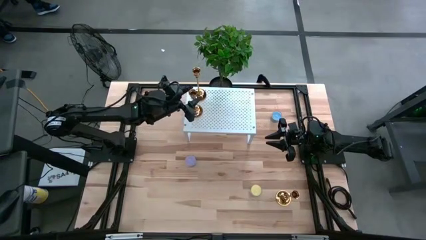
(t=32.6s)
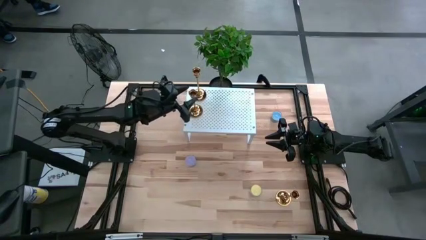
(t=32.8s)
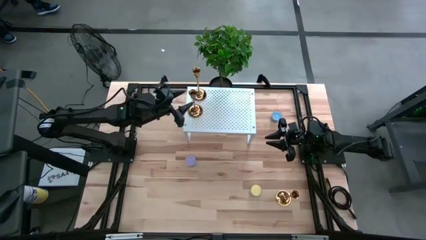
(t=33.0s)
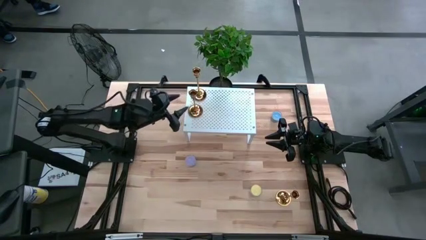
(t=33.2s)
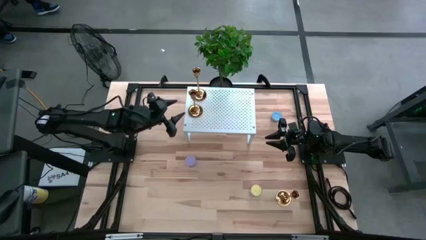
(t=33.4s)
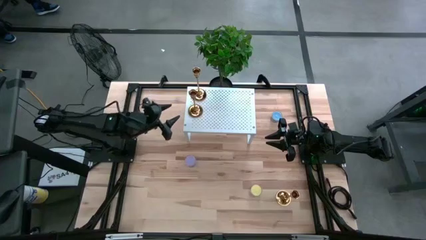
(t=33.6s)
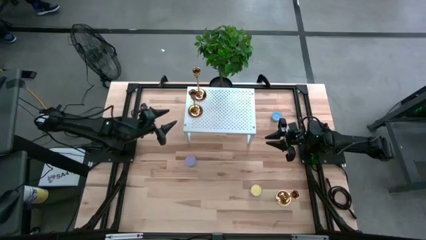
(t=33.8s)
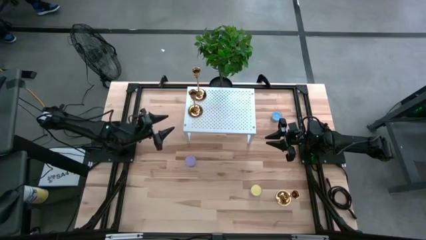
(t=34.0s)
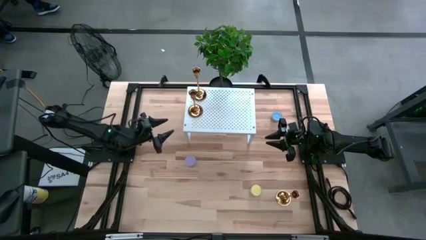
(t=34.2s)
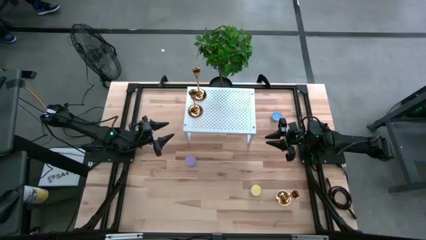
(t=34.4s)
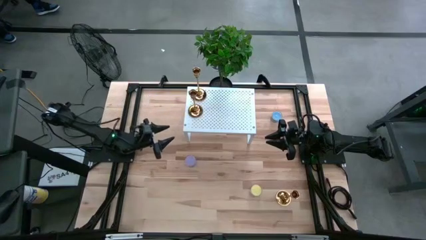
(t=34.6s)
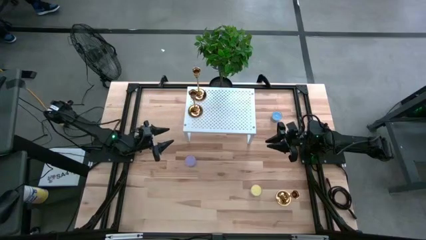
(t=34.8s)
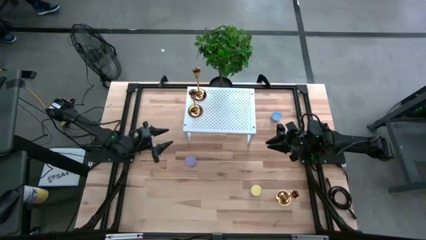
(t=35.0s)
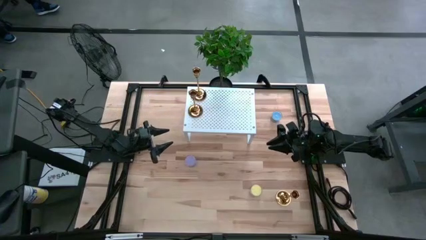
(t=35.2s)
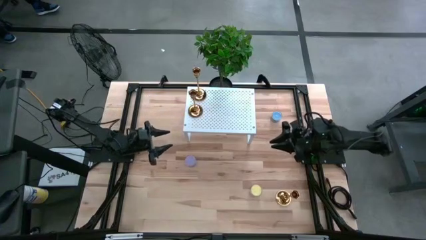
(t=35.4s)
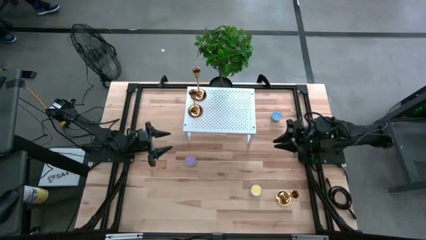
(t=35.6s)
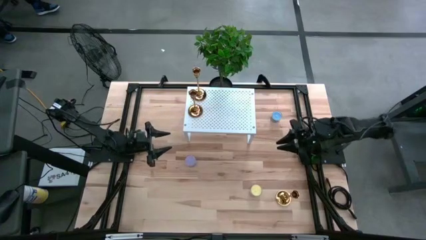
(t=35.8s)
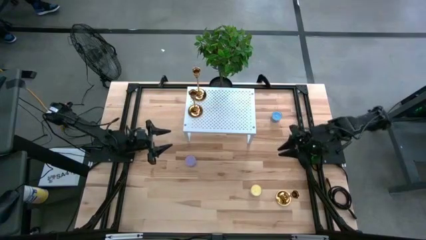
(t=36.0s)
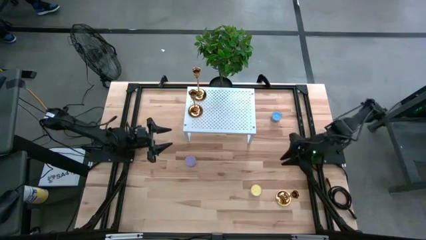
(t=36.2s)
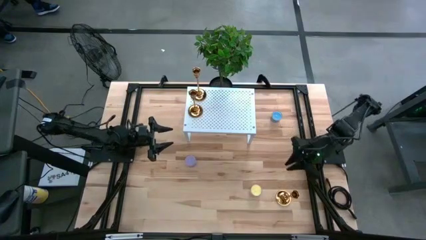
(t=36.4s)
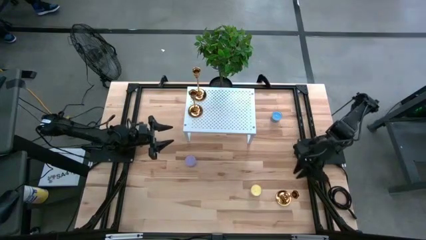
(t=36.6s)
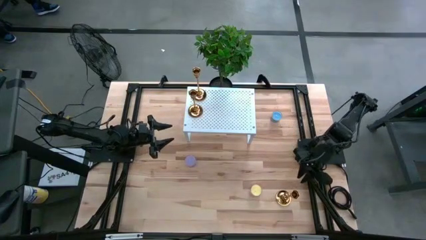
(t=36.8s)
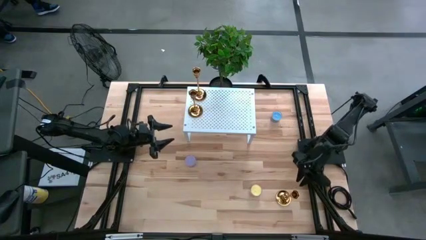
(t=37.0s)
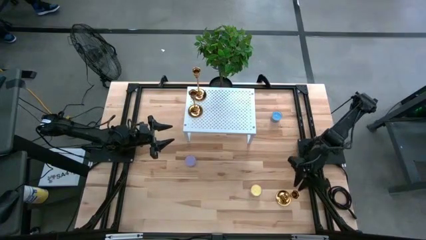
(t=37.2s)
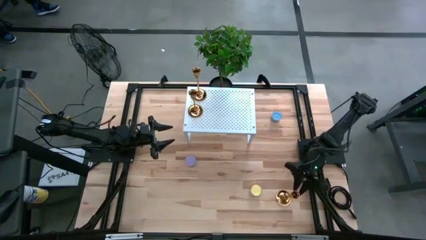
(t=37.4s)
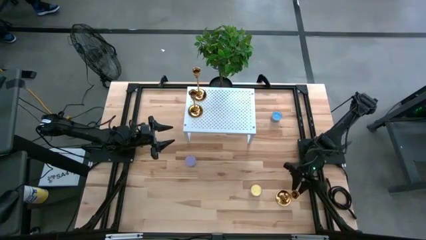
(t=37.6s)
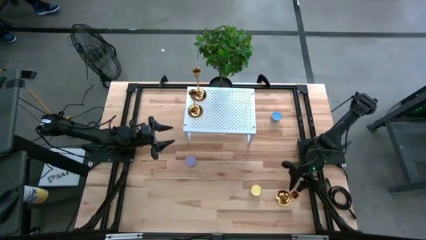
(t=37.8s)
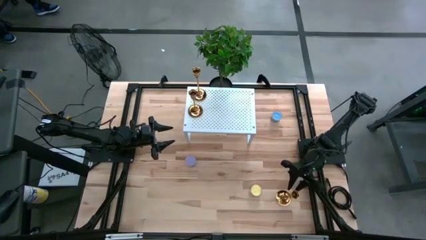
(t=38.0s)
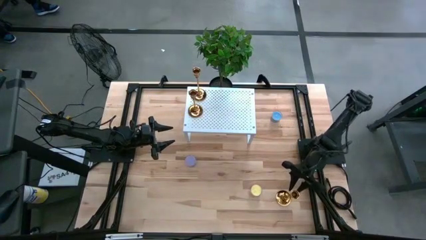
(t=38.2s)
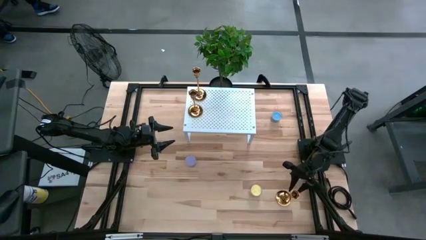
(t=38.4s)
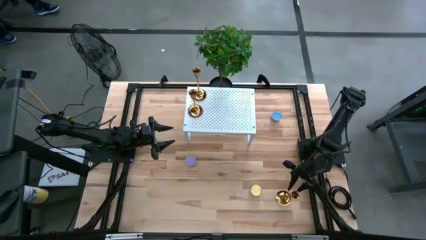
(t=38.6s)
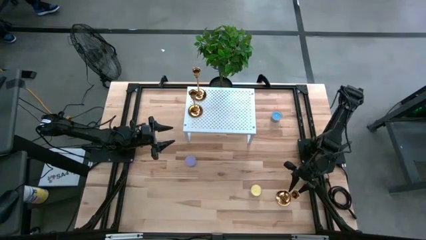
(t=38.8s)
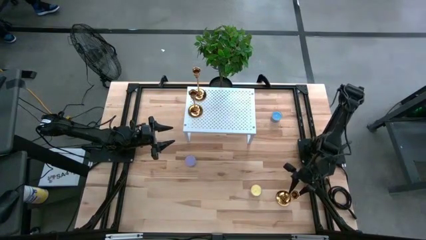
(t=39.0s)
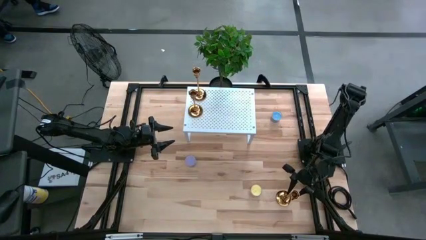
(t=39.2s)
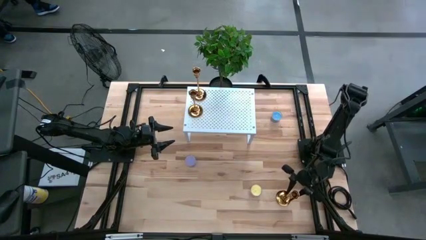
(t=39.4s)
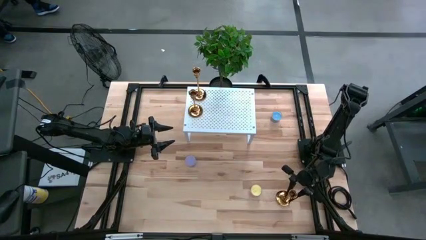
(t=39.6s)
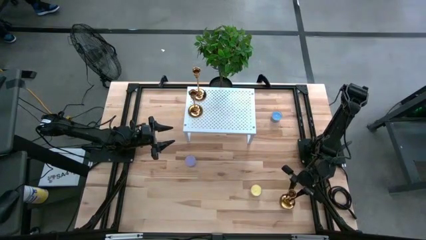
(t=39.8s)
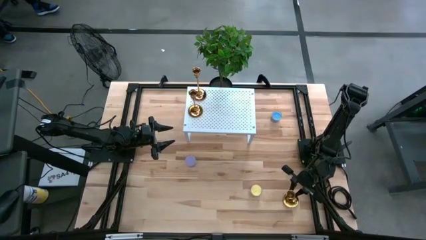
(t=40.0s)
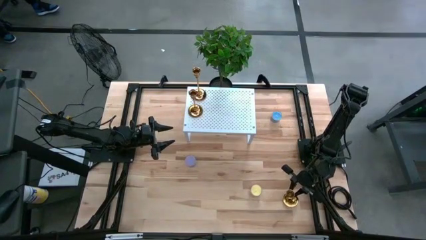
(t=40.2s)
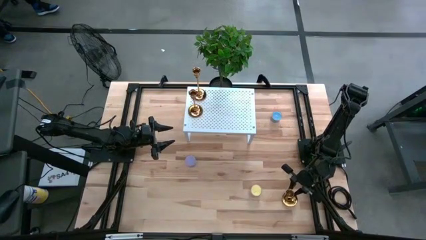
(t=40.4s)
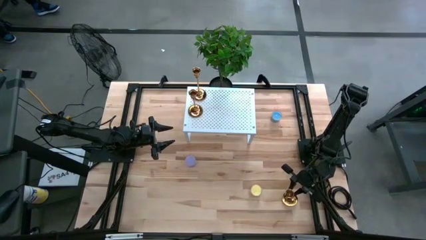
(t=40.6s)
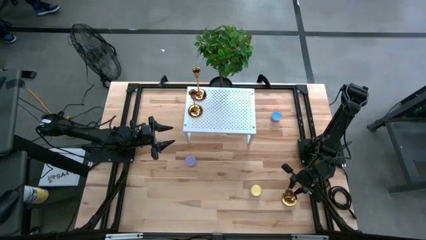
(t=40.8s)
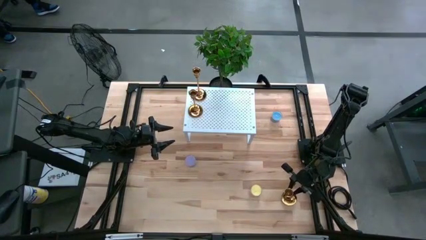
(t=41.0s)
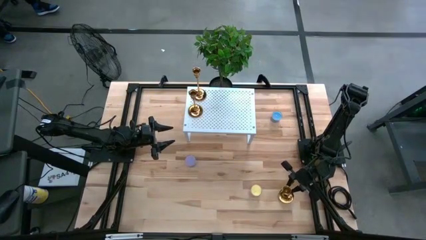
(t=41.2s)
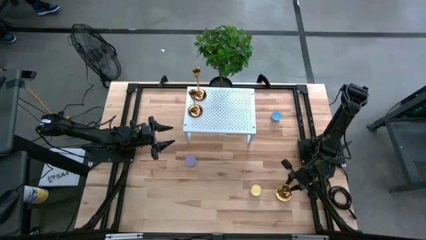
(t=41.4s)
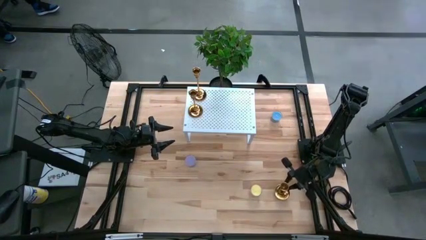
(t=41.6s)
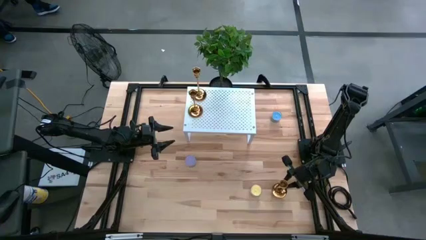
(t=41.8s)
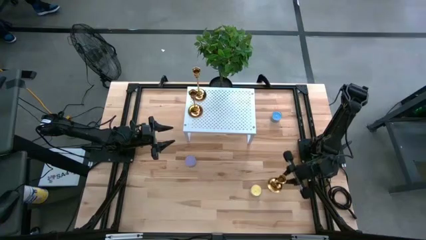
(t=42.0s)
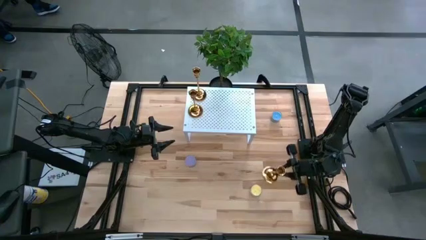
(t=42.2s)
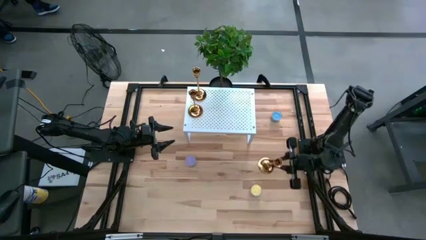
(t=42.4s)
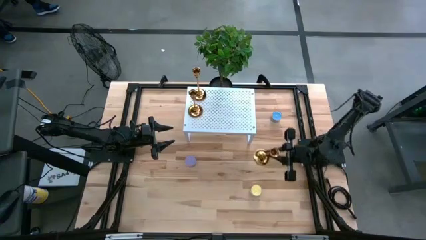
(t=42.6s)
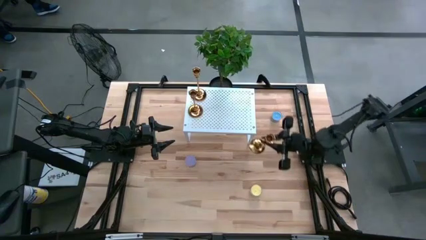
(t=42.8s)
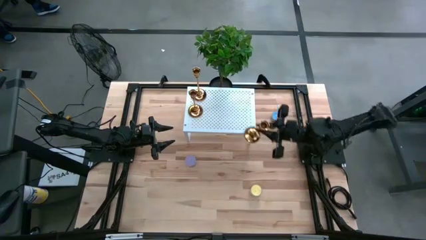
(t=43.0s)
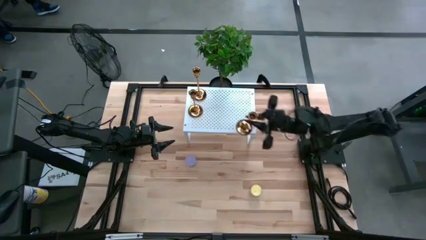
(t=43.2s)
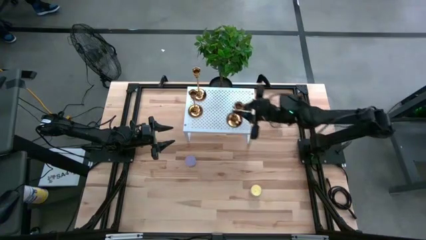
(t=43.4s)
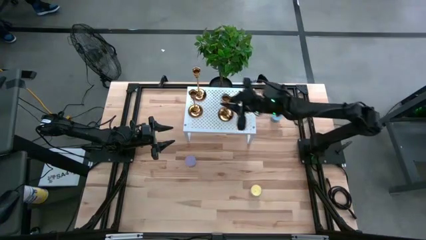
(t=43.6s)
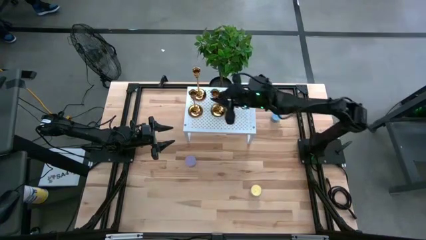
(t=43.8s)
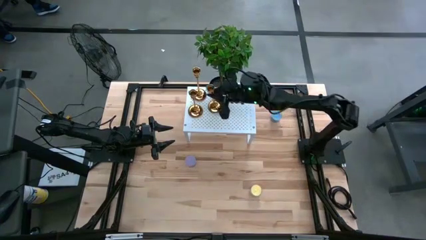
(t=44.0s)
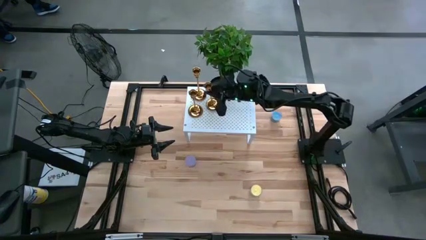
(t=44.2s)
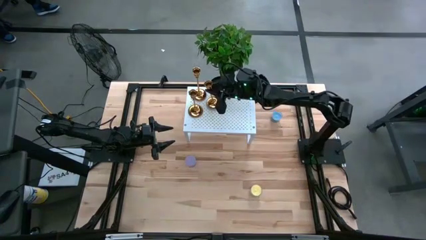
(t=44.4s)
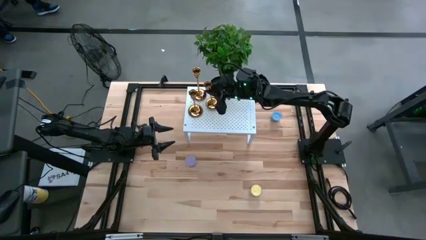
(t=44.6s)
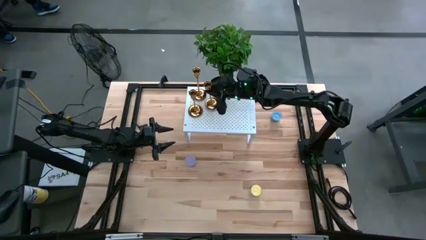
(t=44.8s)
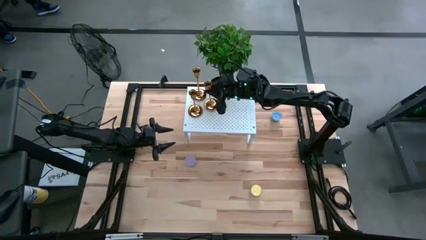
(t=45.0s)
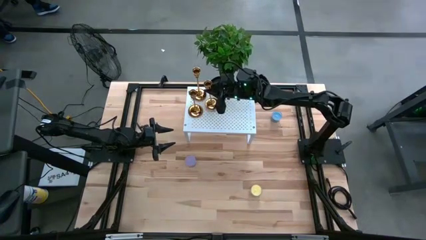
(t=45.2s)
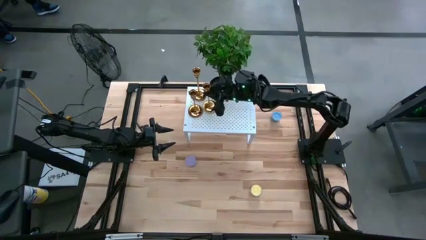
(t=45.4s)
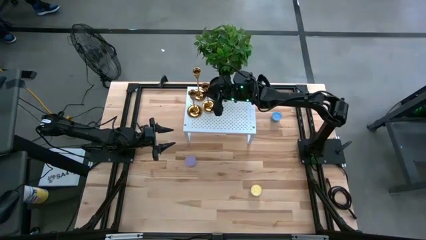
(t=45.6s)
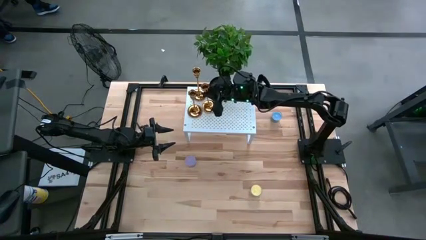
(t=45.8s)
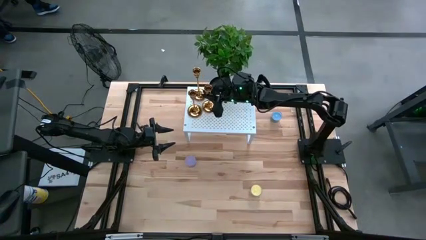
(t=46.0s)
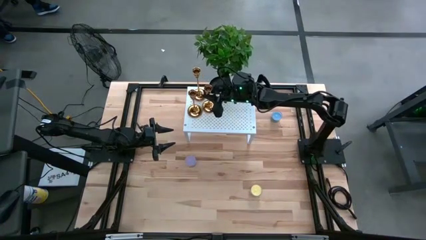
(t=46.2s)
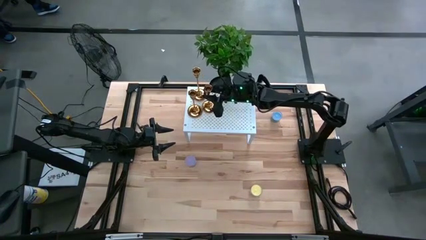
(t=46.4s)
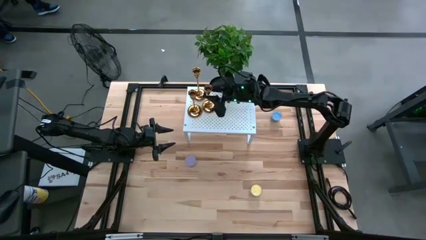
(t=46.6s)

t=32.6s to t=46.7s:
Task: Pick & Place candle stick holders
Put the gold candle holder on the shelf
